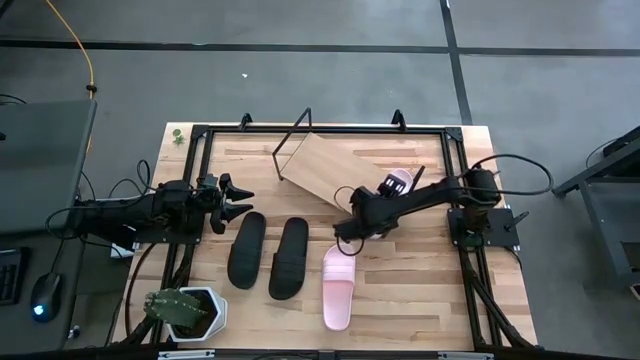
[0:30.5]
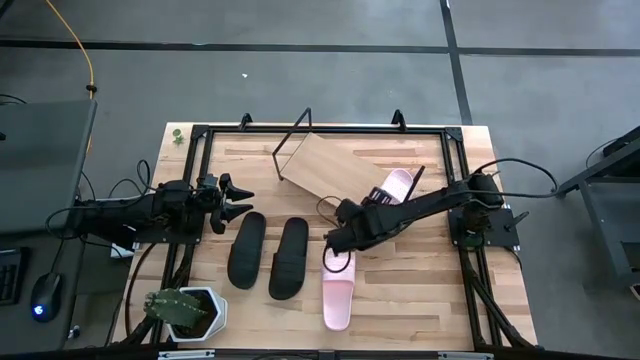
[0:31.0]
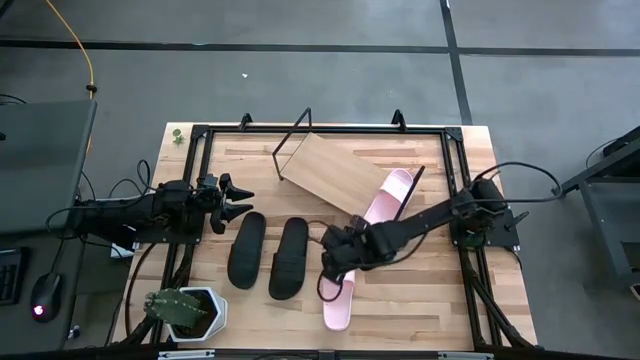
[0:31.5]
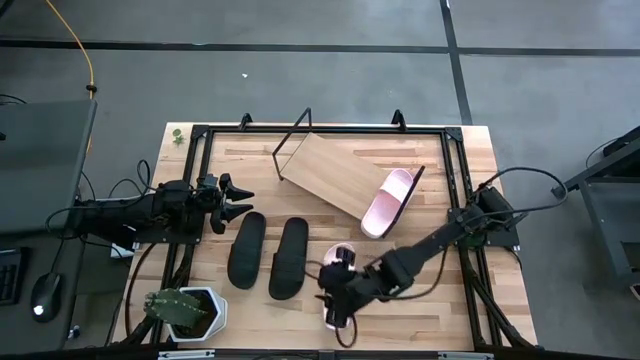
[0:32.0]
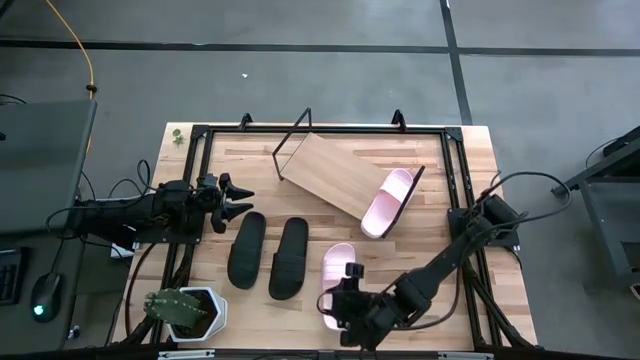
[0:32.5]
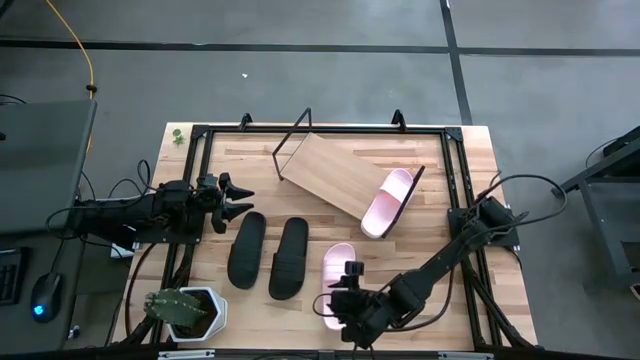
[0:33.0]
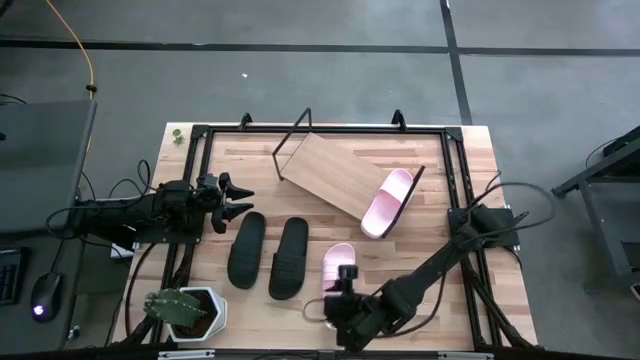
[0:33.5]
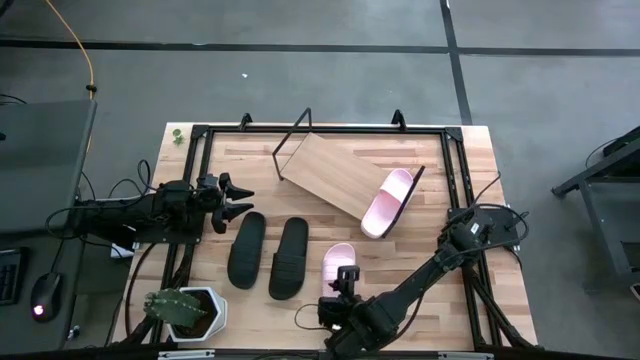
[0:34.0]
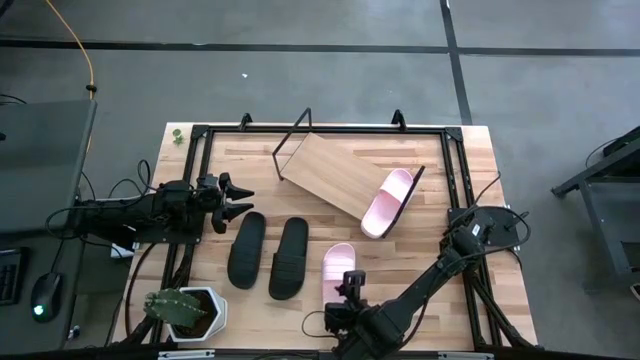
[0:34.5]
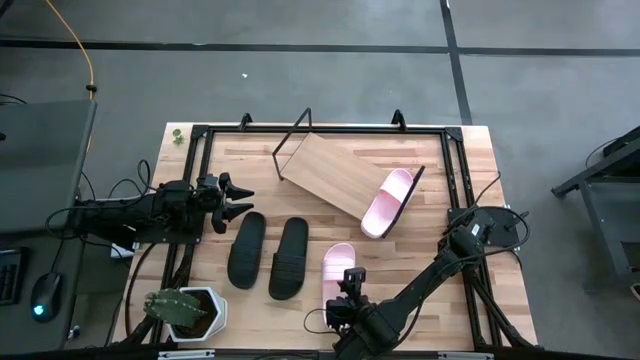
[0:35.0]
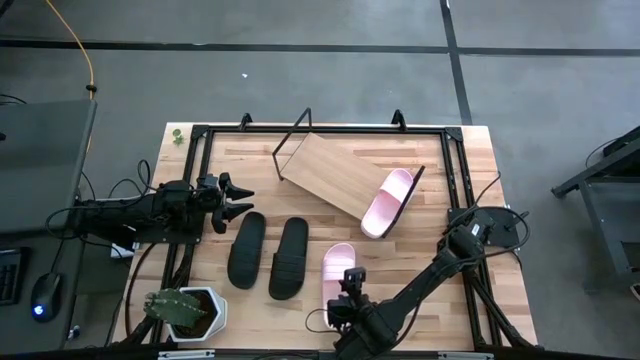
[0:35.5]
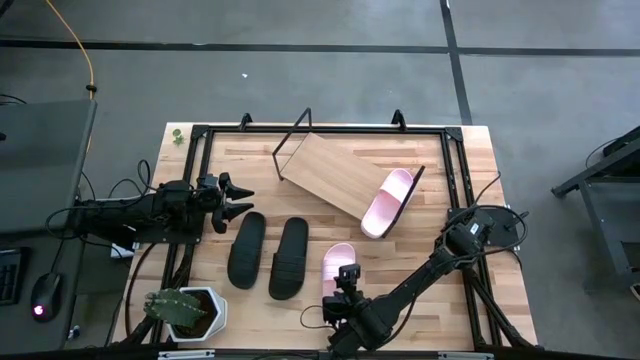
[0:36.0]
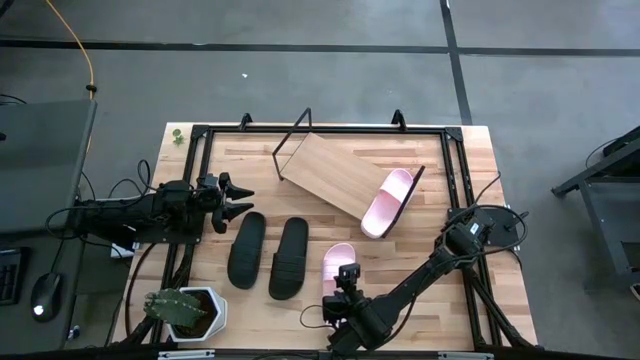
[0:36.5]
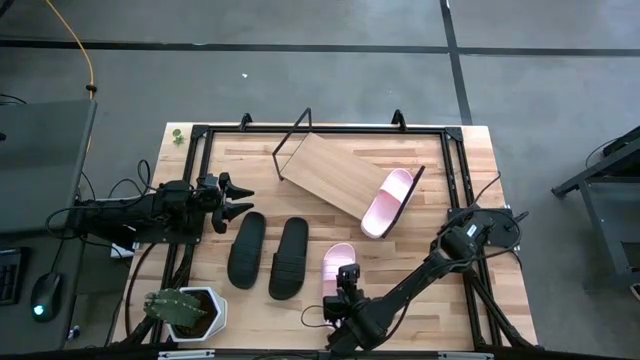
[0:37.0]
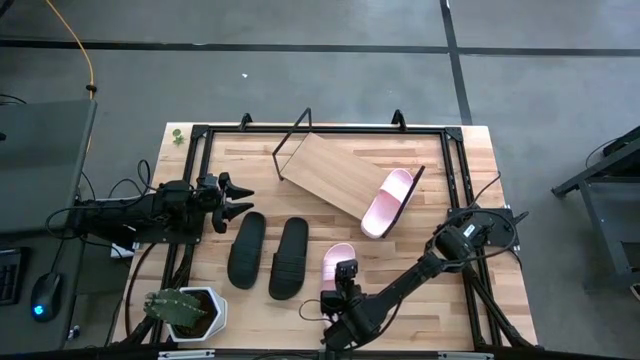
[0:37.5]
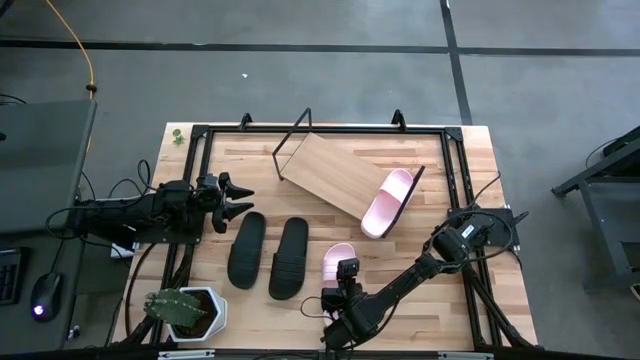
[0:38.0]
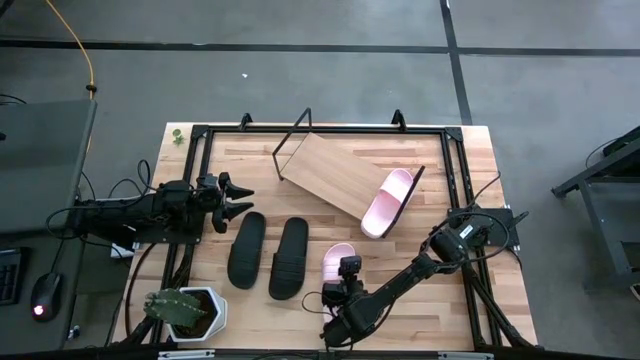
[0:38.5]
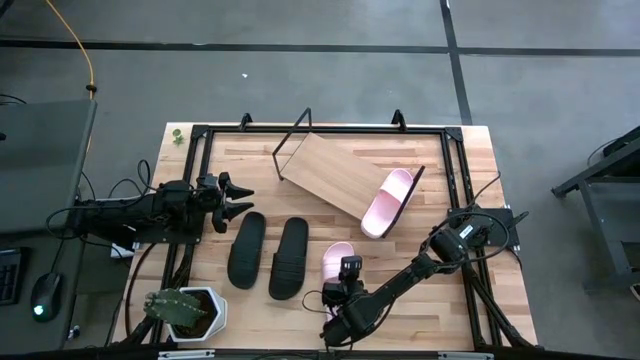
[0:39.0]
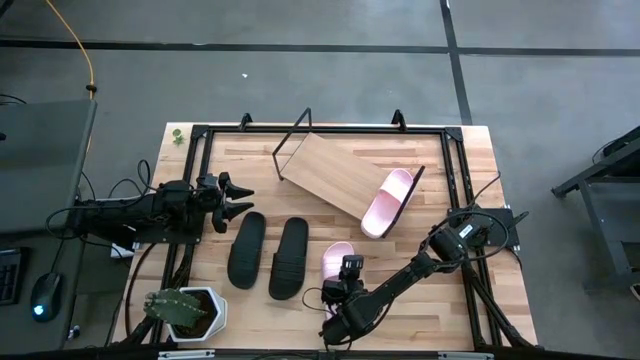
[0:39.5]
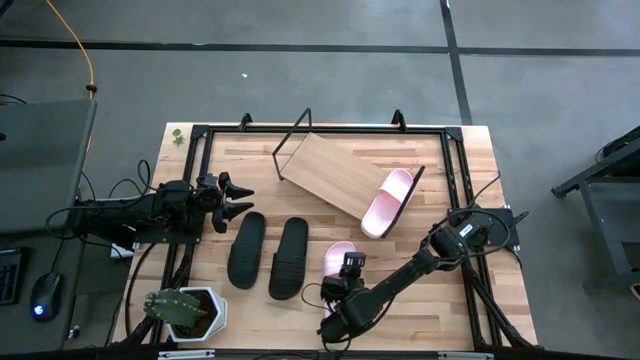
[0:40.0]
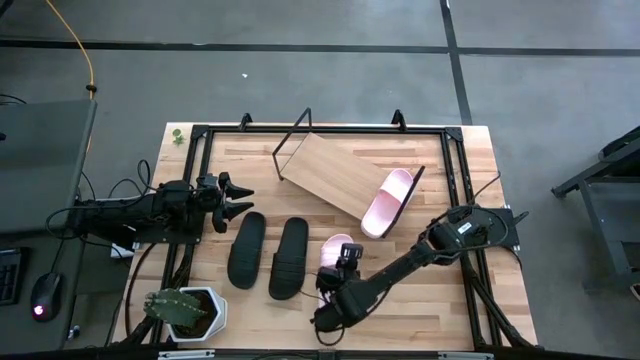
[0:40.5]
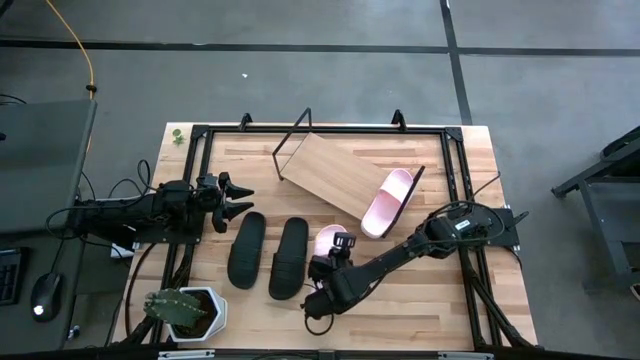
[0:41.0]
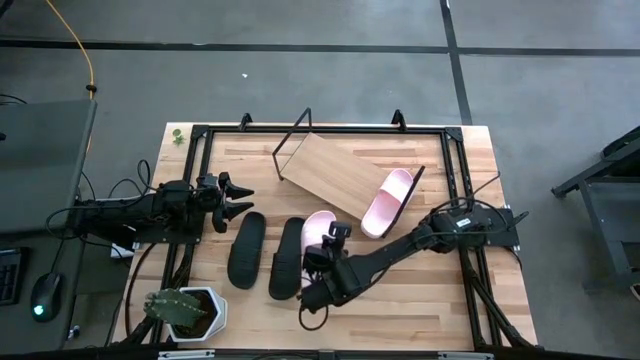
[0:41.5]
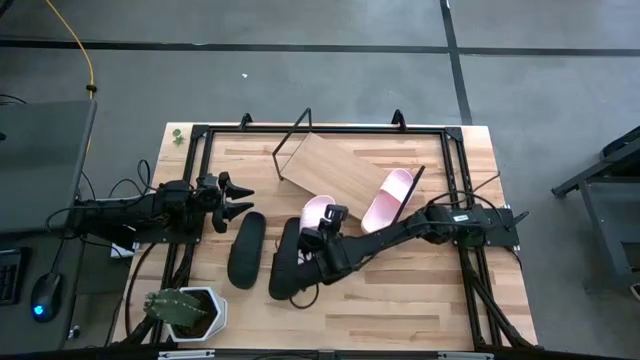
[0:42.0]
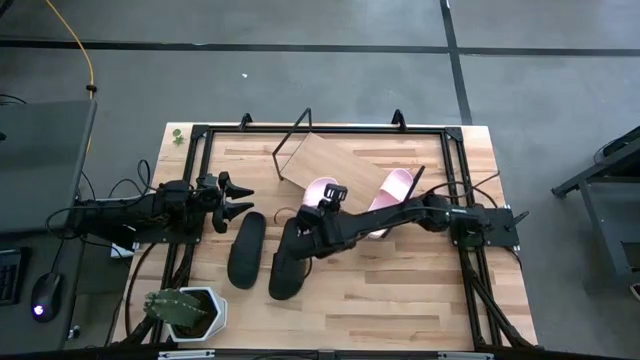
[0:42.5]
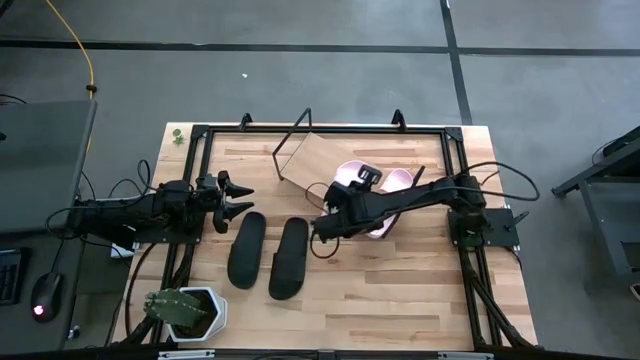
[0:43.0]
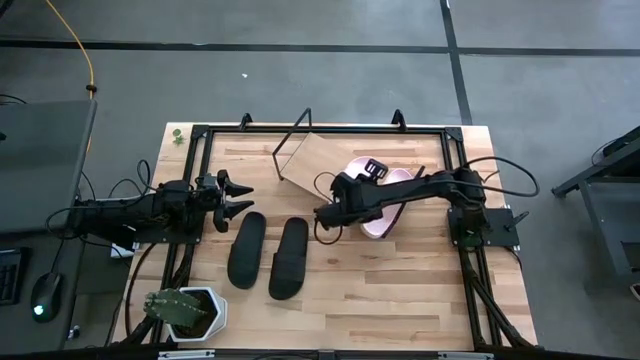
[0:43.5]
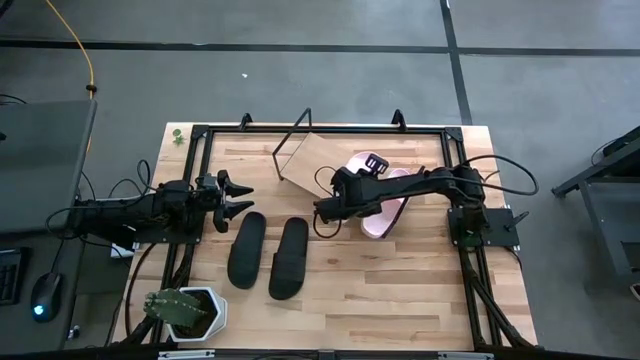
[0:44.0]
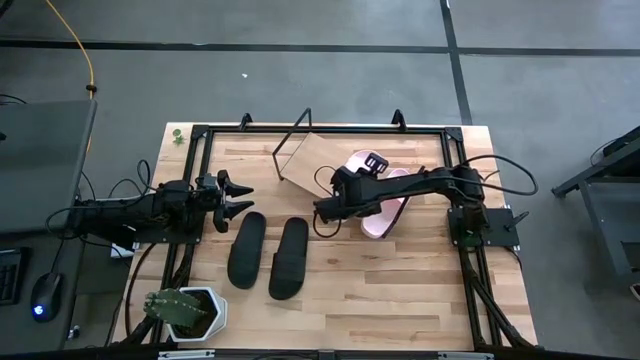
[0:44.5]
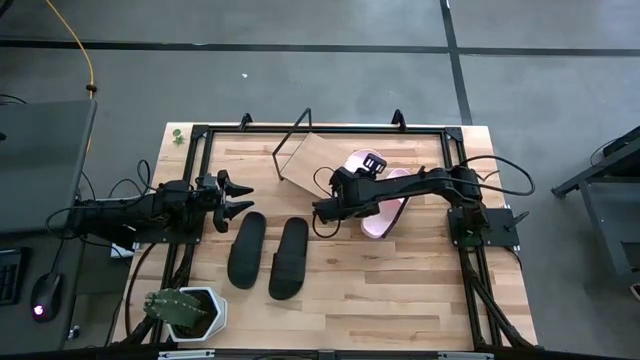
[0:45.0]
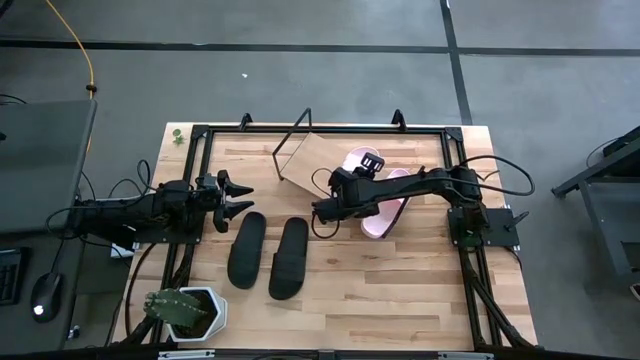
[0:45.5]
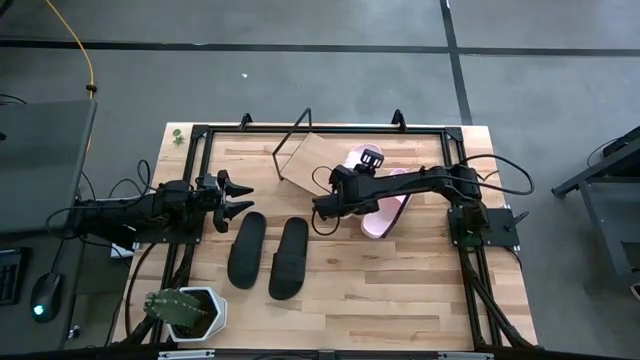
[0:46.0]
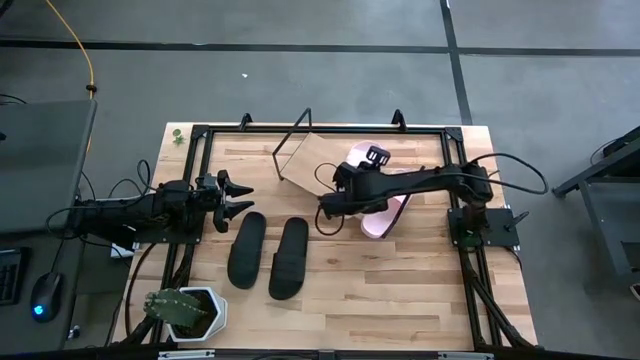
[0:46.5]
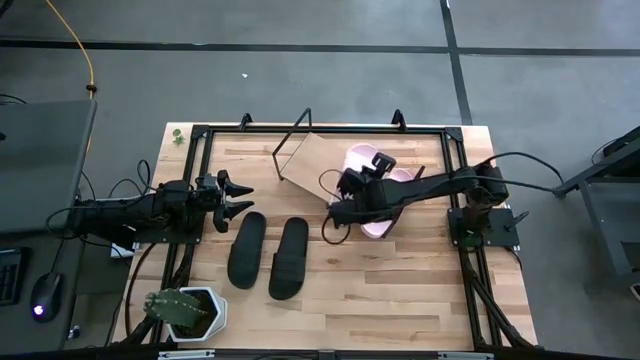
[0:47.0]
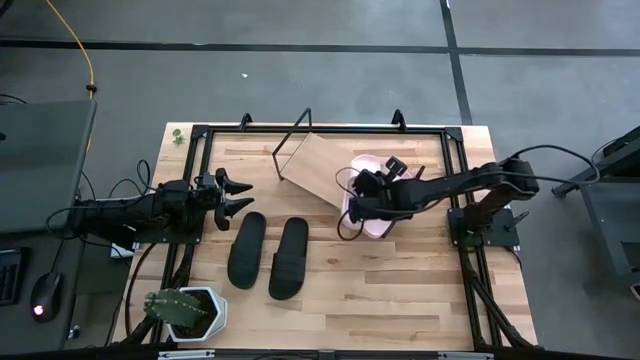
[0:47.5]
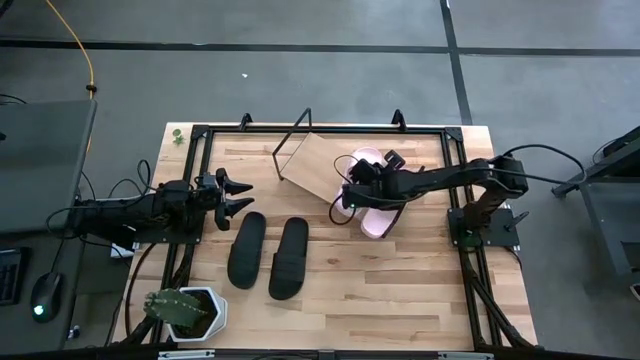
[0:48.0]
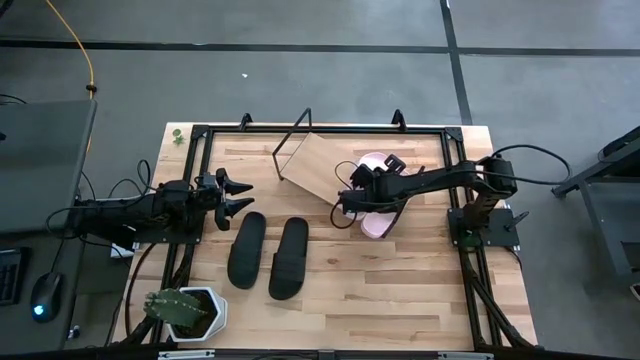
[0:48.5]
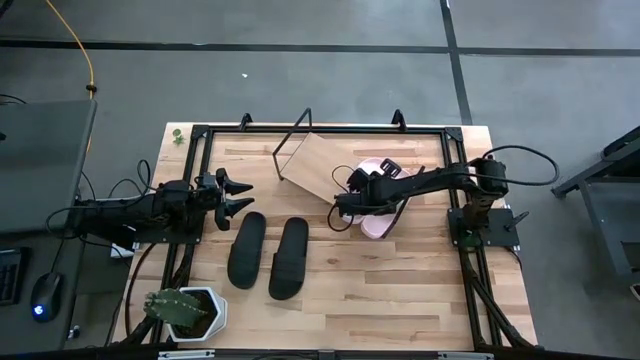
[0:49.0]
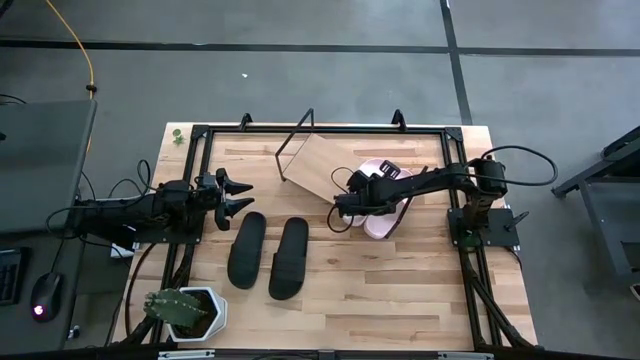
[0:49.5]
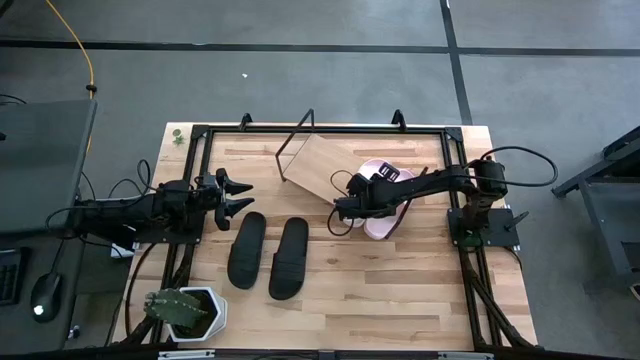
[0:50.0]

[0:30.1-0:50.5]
Task: Pick and place slides into the shelf
Put the pink slide on the shelf

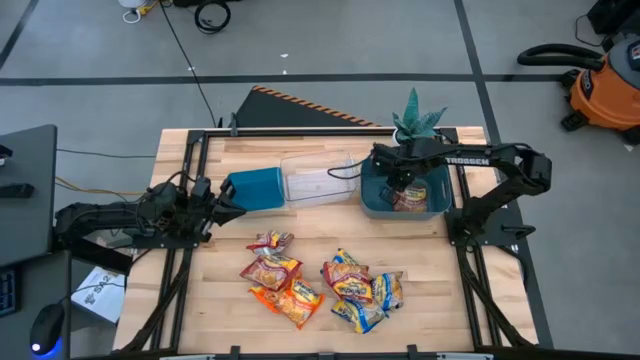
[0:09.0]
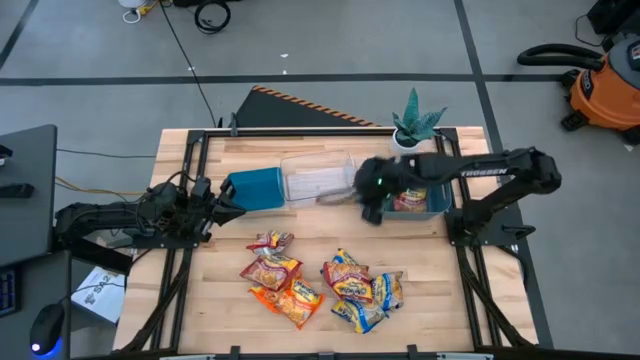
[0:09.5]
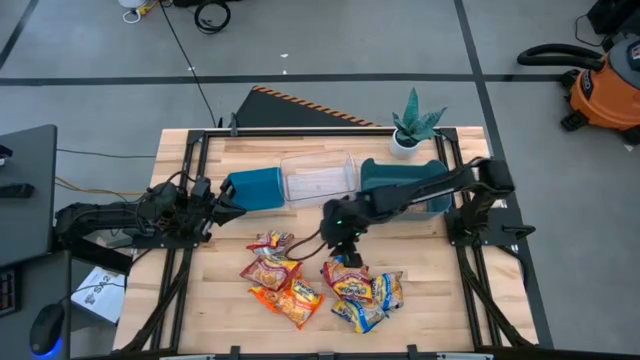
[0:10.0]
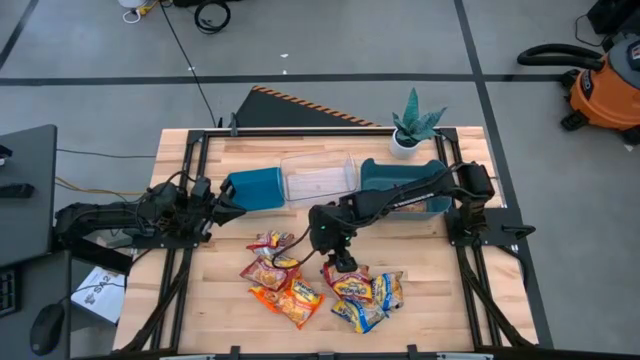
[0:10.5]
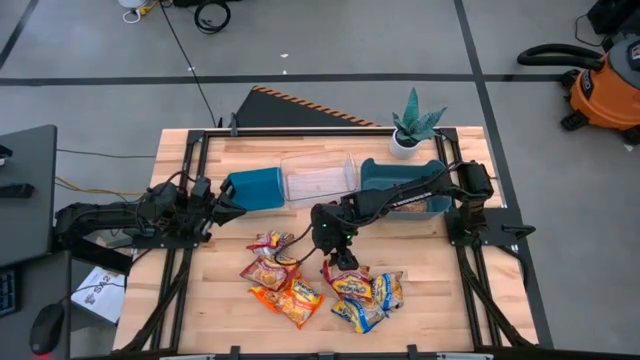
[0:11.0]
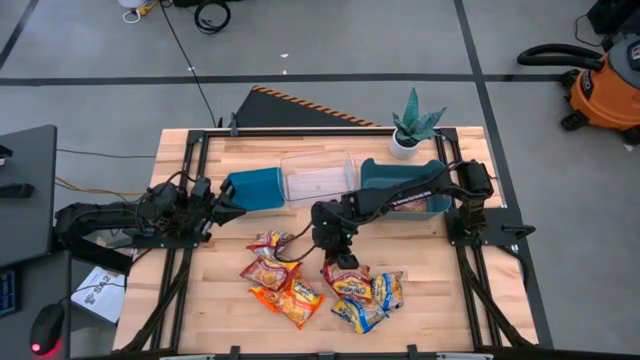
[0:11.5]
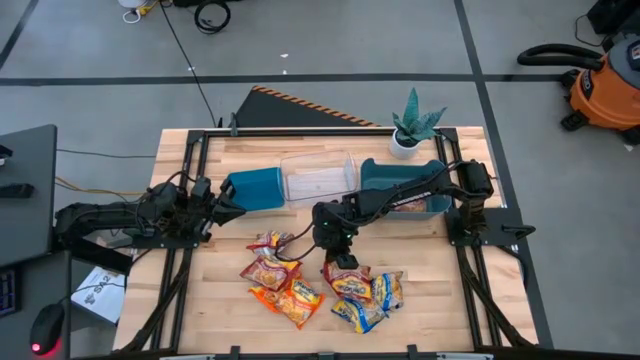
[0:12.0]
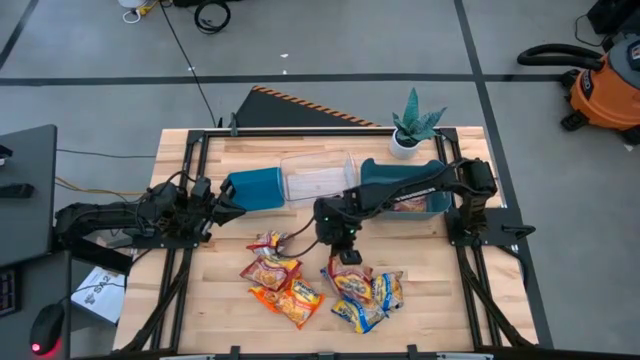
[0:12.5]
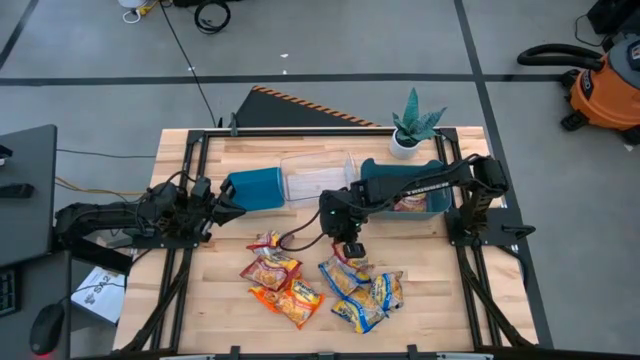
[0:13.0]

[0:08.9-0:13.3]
Task: Sort Maruchan noodles
Put the bottom right red noddle pack into the dark blue bin
